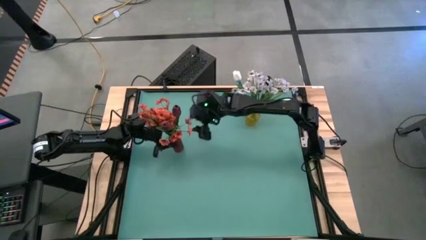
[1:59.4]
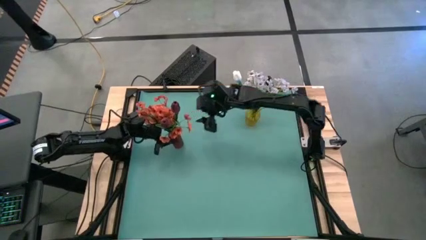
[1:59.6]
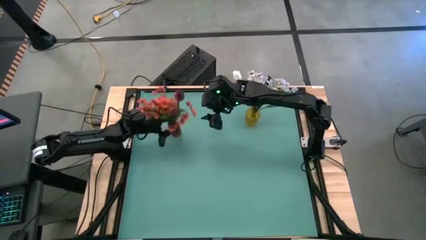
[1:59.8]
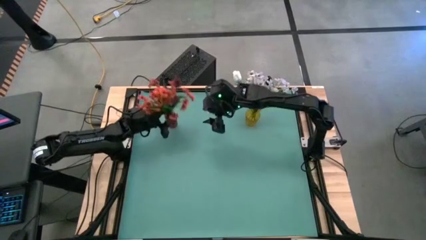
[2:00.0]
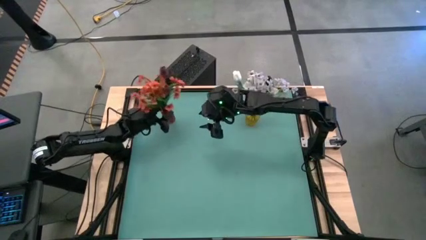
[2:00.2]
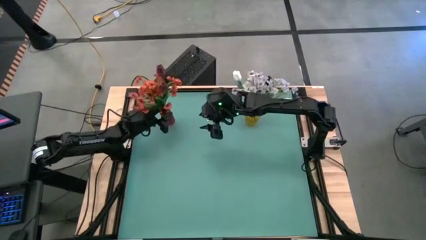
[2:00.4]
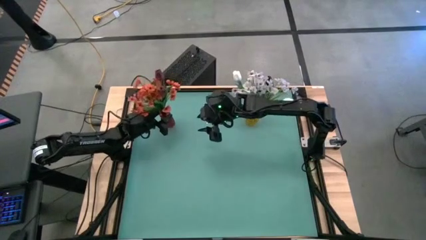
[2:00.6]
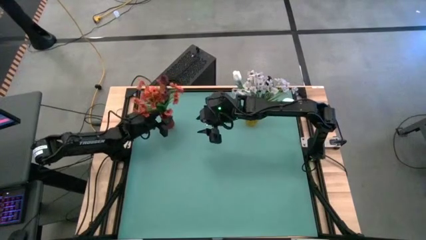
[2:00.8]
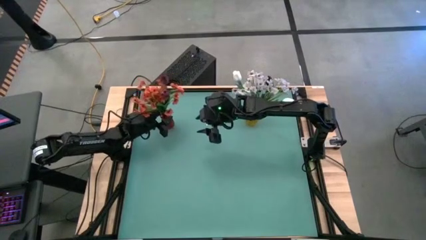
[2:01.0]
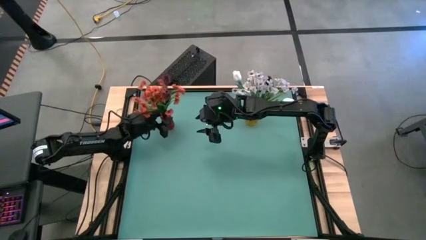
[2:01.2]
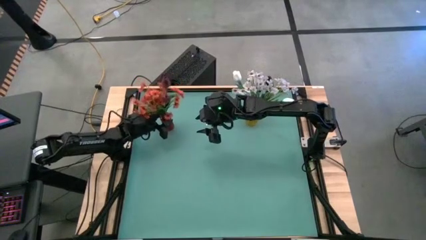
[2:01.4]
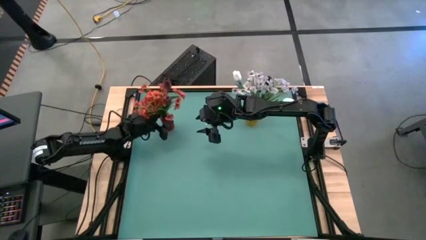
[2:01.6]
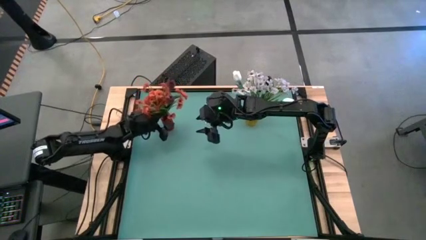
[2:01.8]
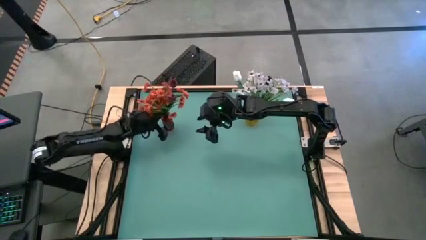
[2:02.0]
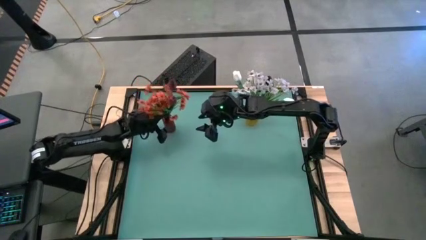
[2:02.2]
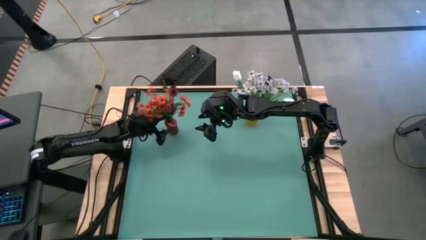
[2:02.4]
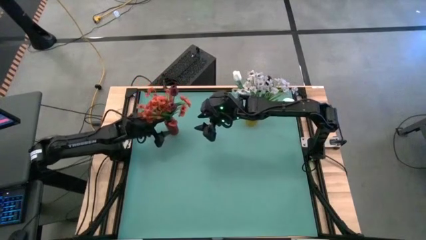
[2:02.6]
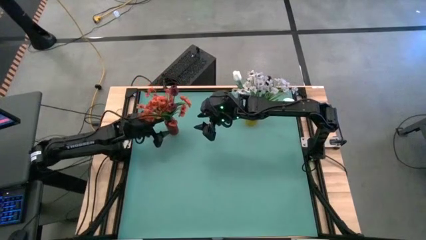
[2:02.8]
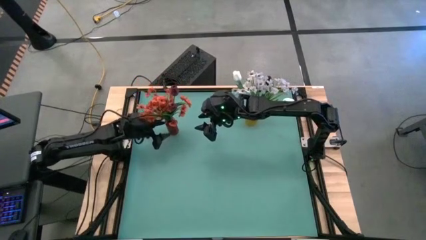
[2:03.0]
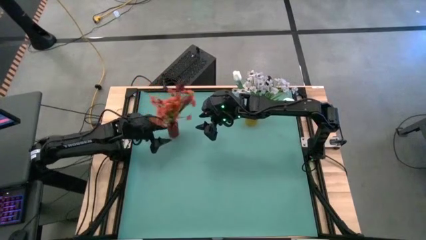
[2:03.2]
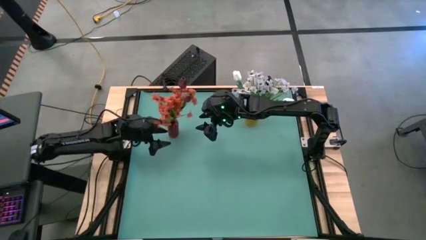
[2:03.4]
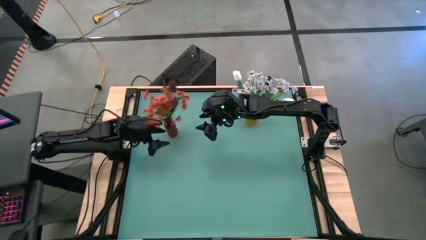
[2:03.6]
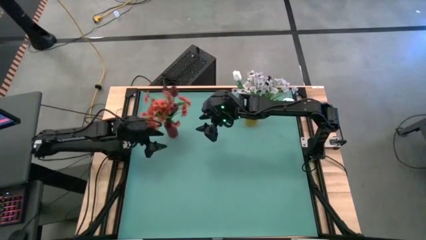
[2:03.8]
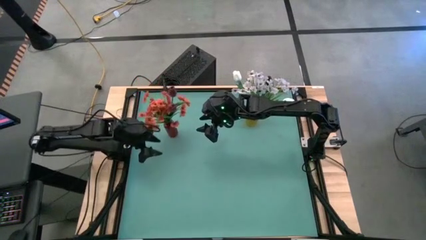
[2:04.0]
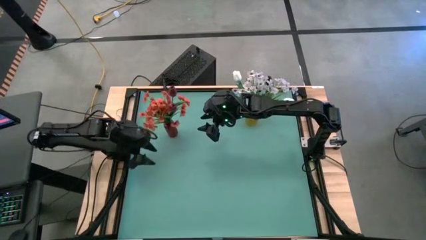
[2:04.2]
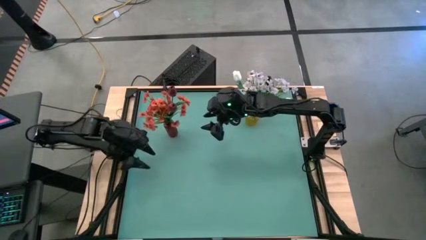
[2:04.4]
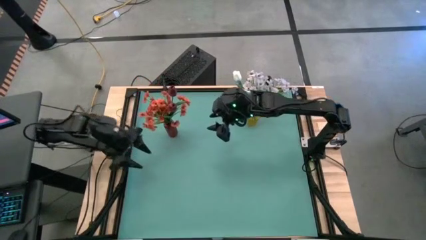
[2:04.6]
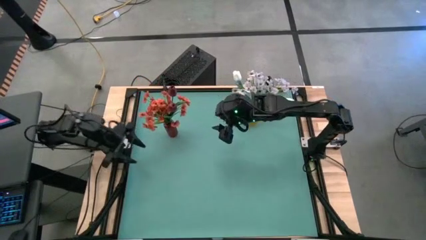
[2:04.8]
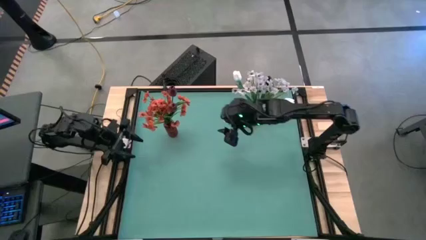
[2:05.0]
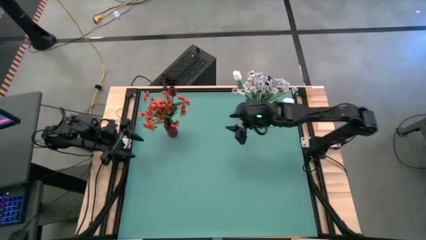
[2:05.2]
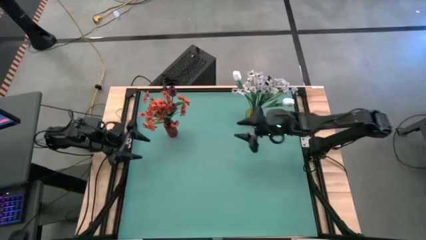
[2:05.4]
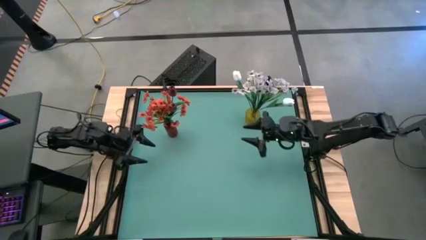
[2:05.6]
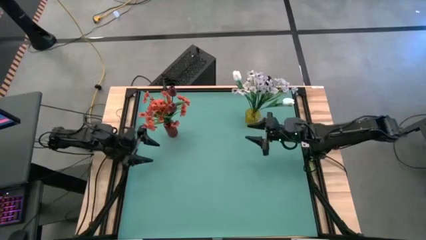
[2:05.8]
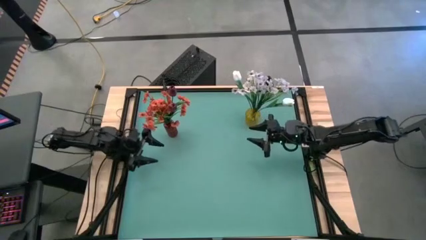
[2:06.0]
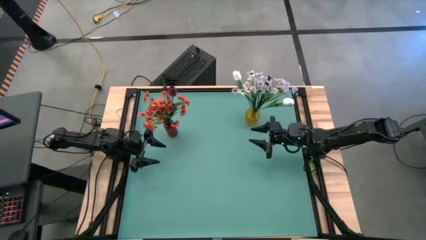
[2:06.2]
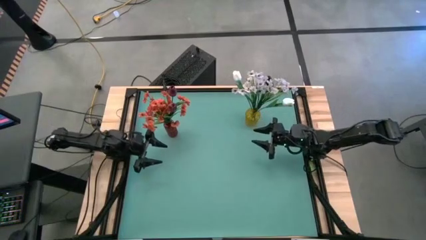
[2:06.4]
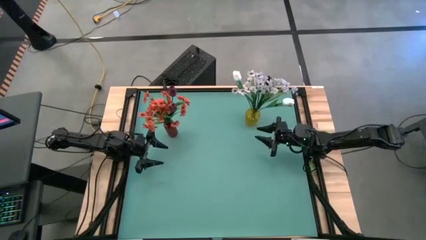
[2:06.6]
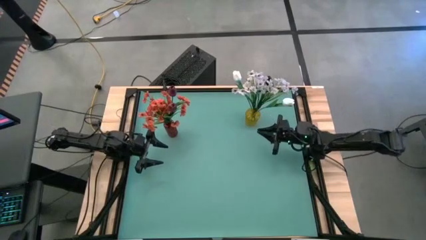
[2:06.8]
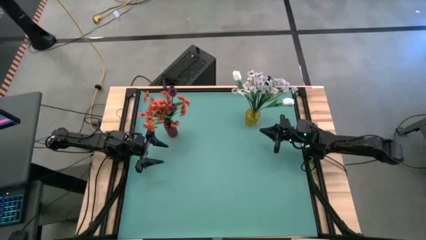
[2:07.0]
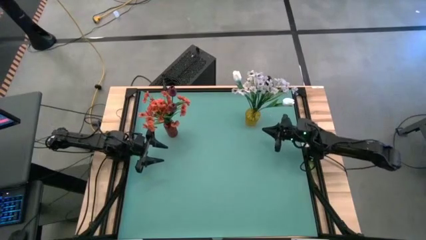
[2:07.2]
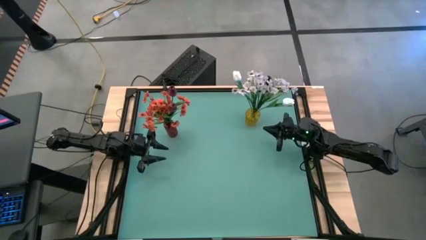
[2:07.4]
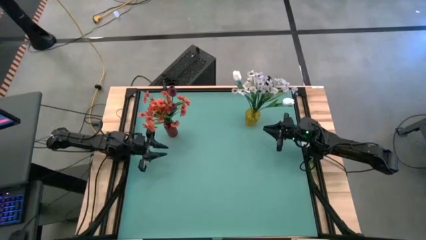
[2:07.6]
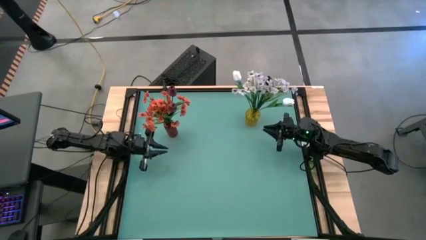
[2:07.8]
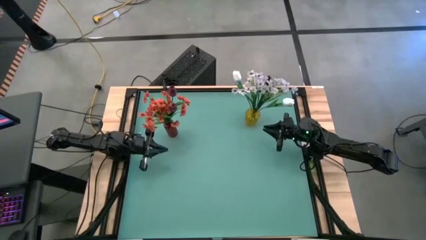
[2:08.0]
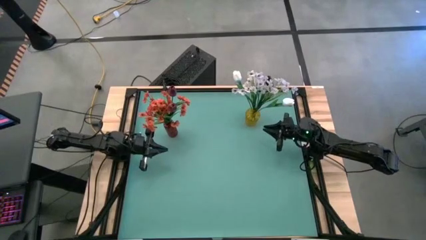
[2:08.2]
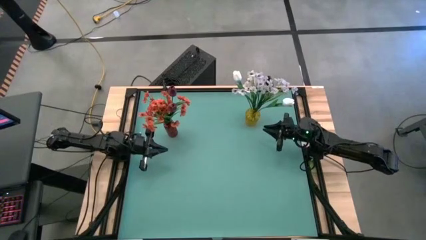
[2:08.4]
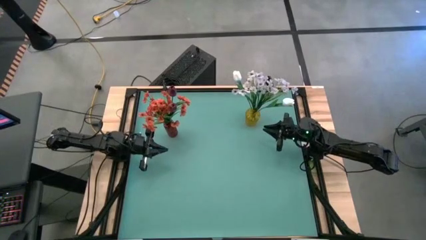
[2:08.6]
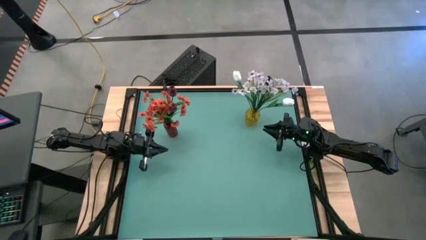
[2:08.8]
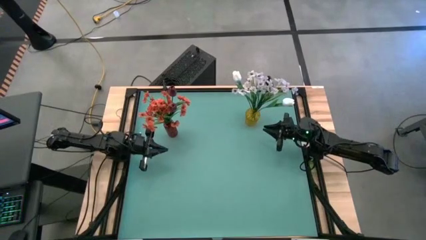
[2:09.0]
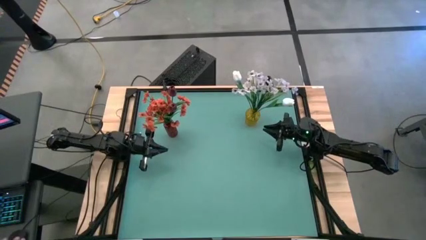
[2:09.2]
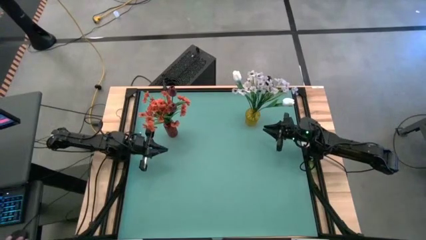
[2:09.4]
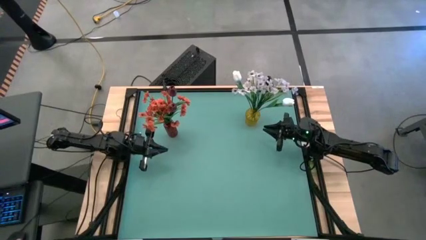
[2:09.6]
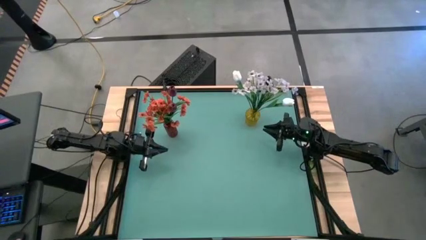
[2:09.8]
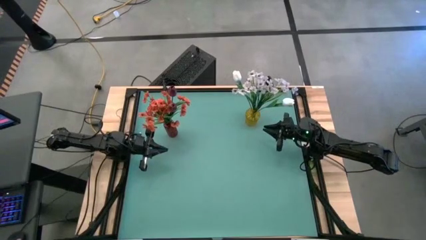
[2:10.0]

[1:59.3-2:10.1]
Task: Sort flowers into vase by color
Return to Home Position

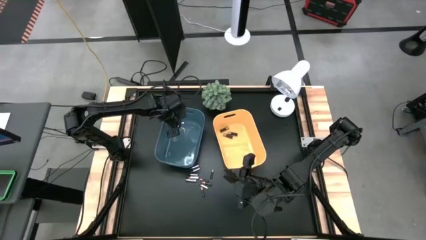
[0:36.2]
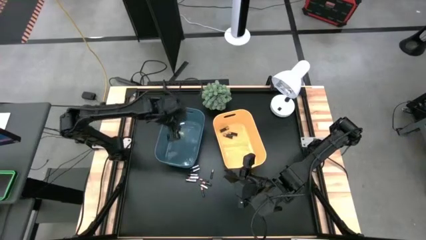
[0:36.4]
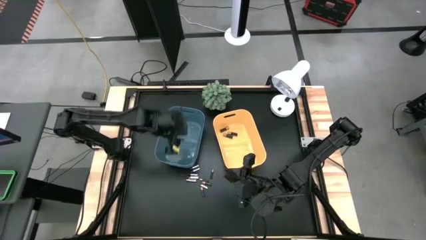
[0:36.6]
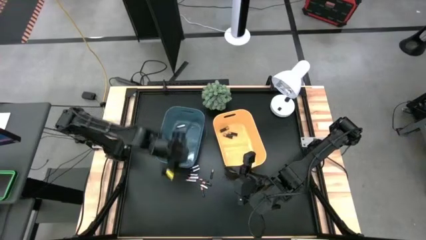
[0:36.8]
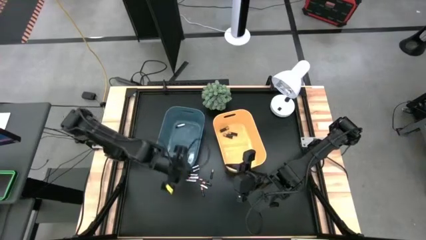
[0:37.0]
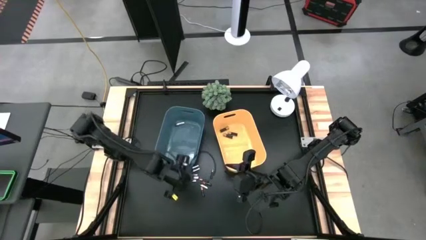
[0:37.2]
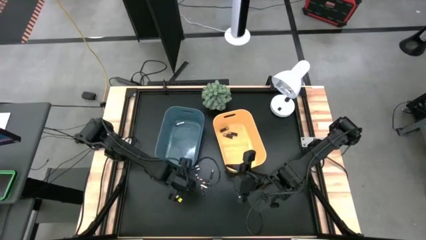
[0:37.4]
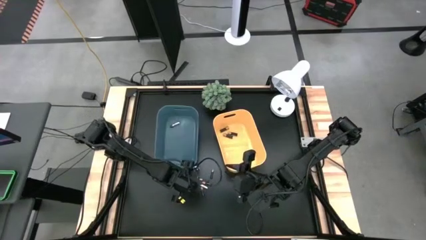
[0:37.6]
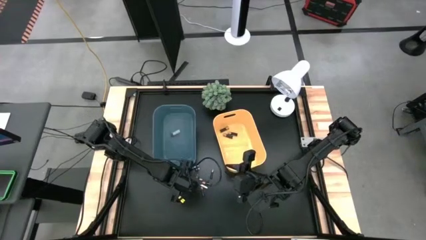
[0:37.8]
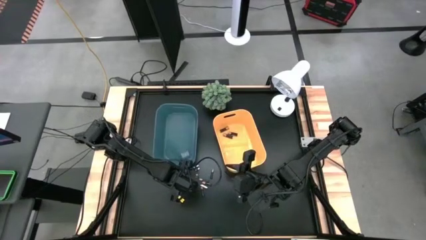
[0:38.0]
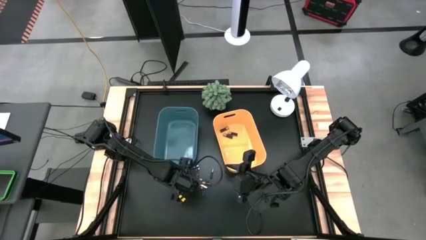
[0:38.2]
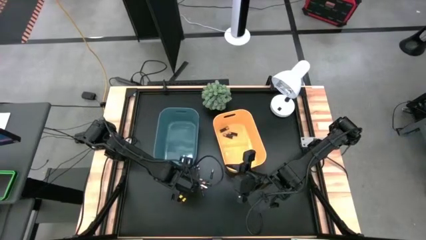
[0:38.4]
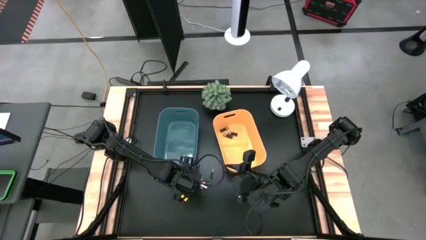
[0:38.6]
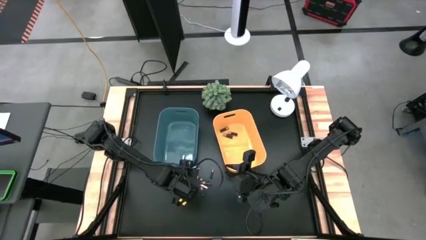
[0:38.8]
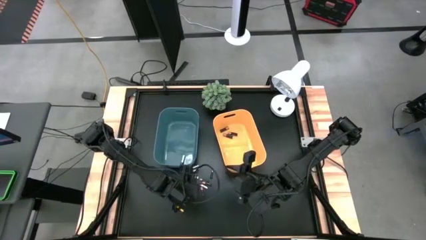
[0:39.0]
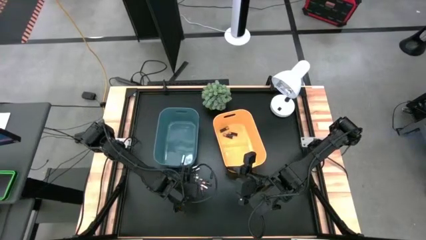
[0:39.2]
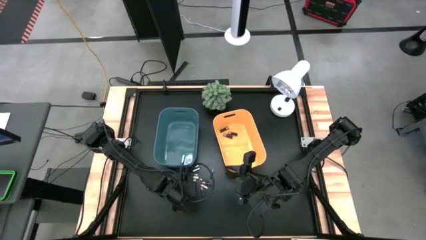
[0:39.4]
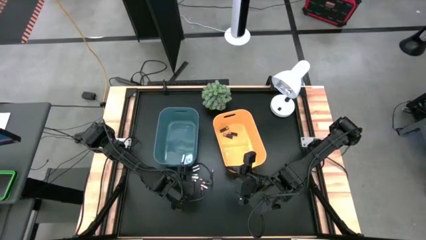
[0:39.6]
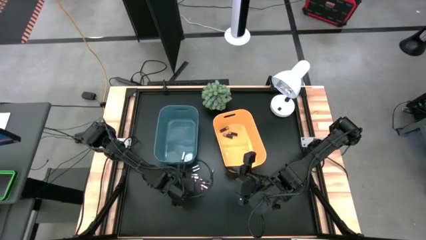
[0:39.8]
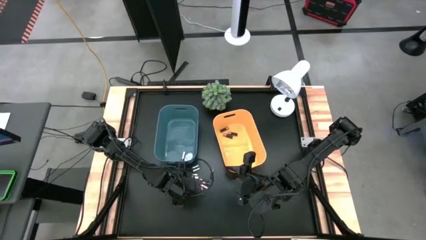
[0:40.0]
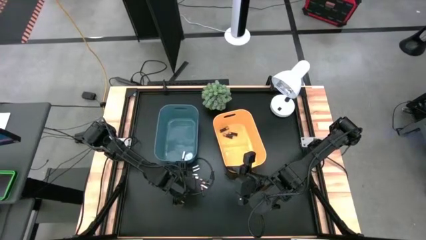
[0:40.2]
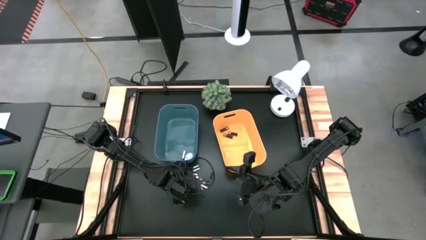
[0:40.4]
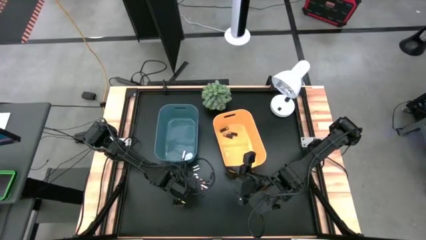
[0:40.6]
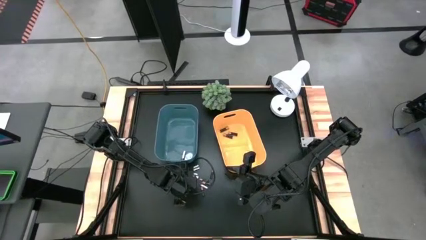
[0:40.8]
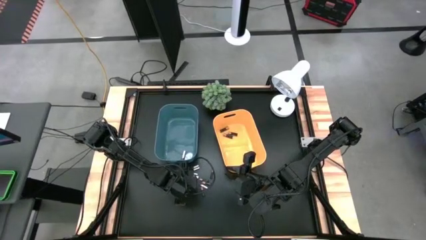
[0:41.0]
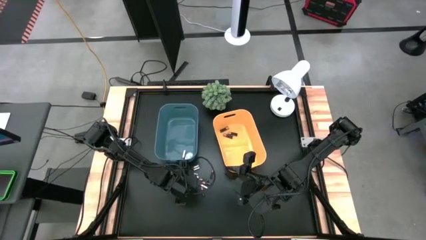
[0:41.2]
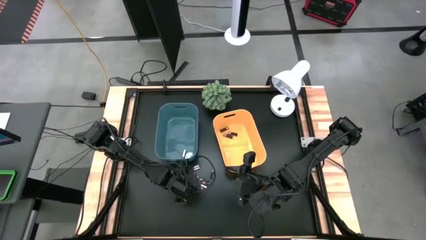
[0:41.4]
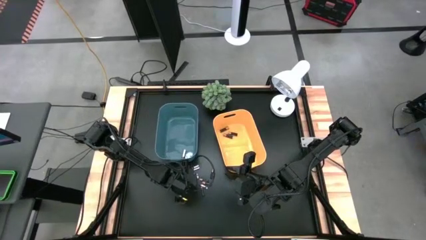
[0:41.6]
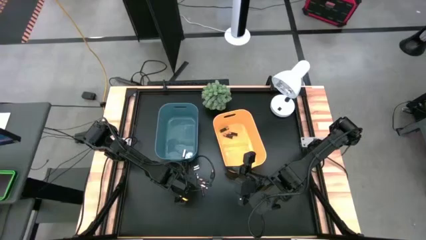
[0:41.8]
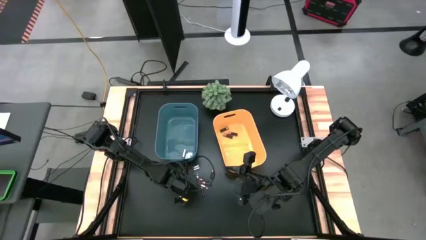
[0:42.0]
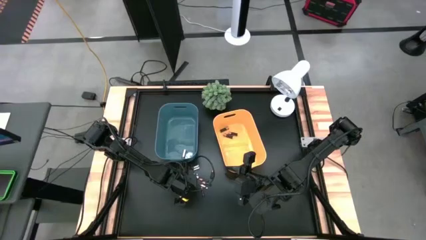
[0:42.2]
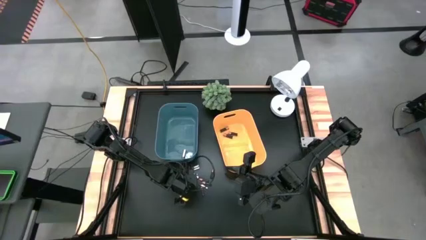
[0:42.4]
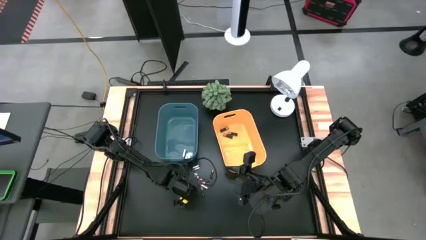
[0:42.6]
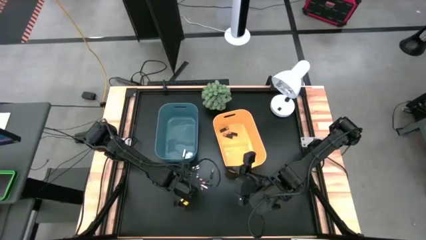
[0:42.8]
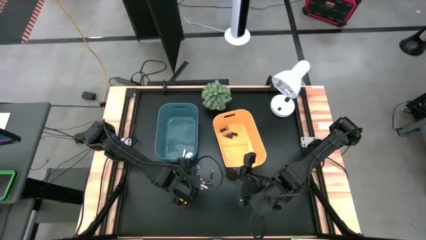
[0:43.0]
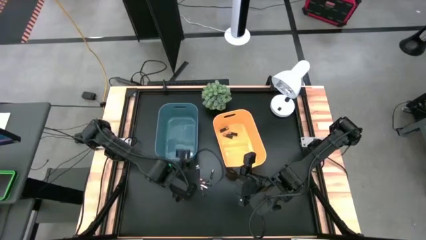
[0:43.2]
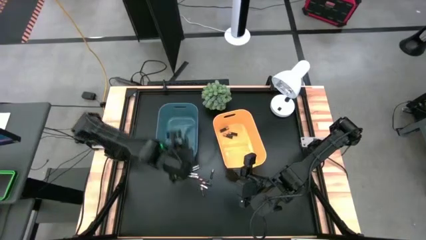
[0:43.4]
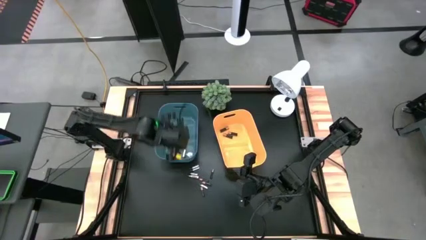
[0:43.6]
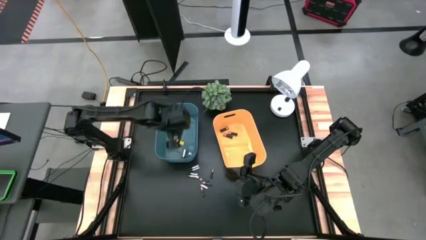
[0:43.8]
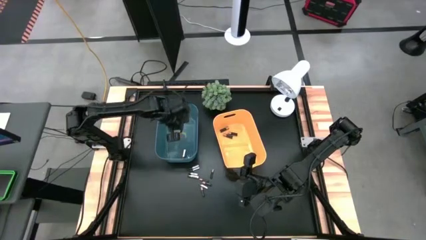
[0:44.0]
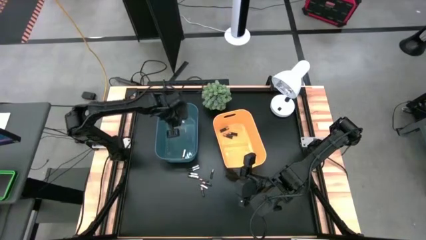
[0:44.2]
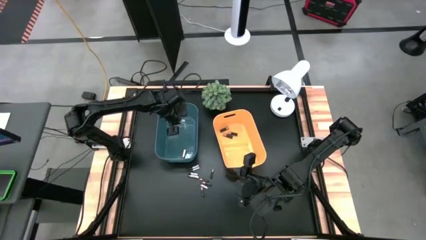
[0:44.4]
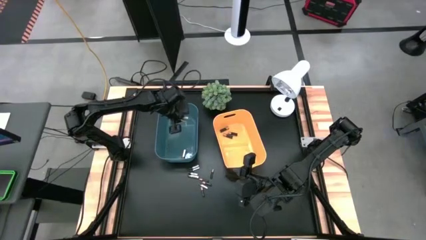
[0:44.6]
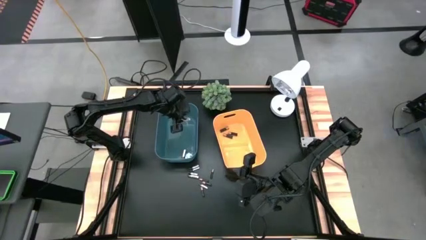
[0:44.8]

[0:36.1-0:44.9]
Task: Sort batteries
Put the silver battery into the blue bin
